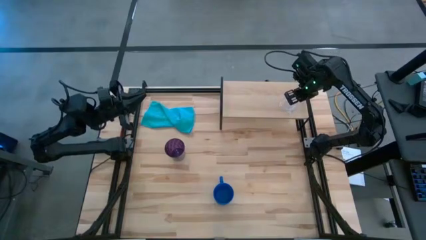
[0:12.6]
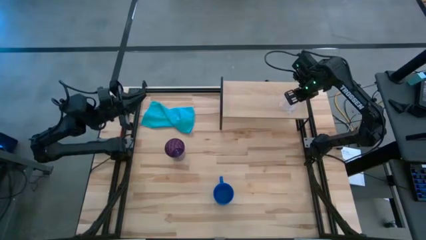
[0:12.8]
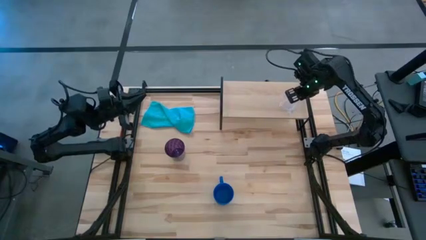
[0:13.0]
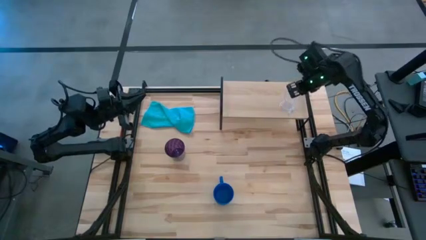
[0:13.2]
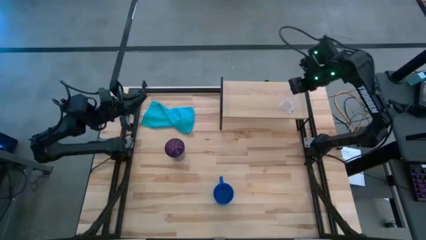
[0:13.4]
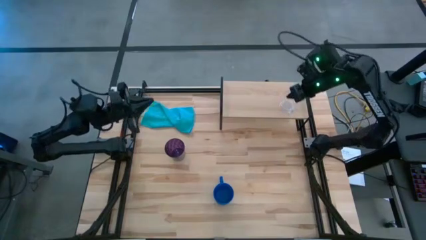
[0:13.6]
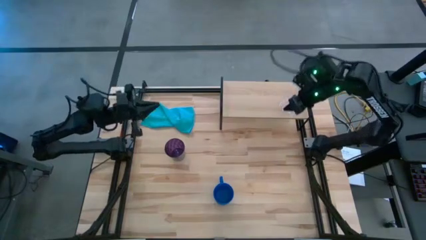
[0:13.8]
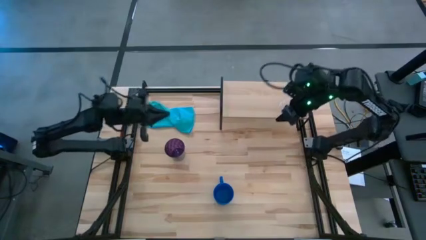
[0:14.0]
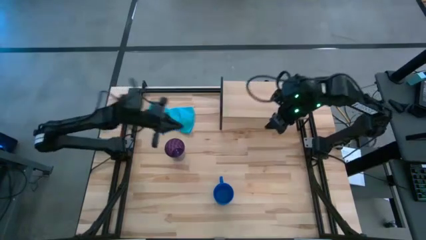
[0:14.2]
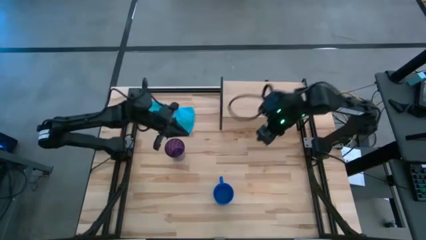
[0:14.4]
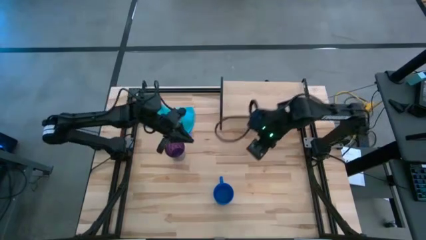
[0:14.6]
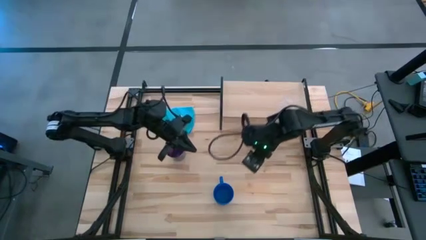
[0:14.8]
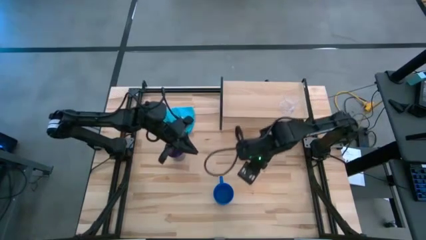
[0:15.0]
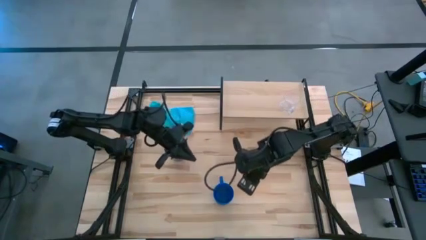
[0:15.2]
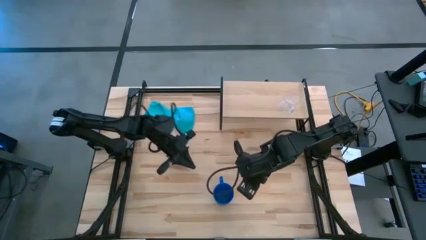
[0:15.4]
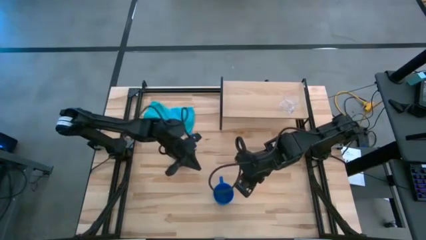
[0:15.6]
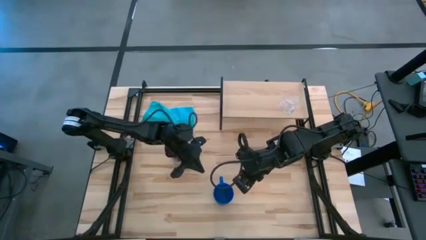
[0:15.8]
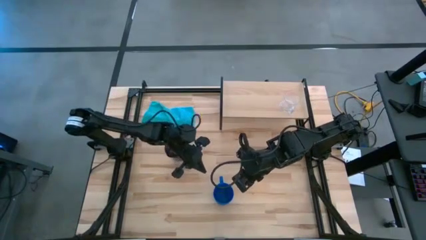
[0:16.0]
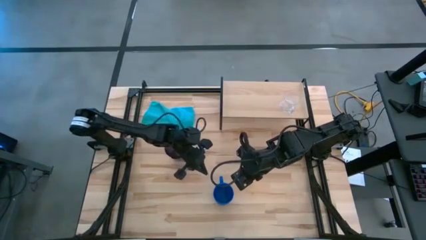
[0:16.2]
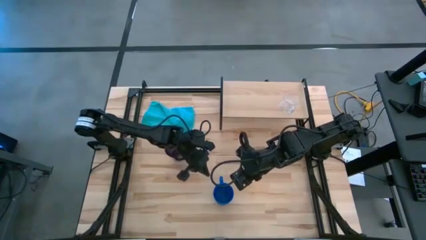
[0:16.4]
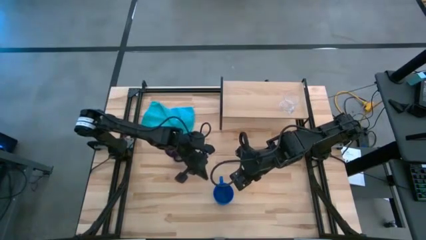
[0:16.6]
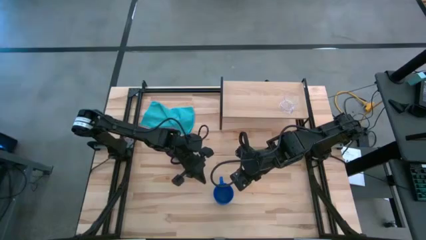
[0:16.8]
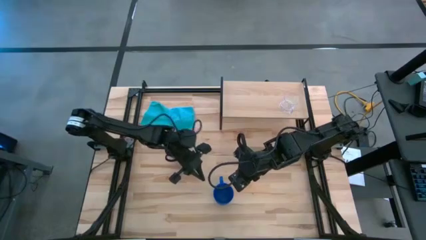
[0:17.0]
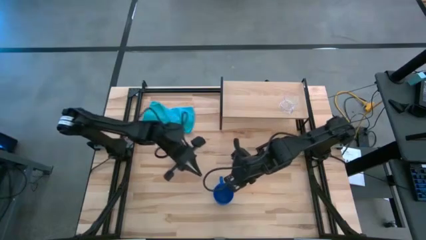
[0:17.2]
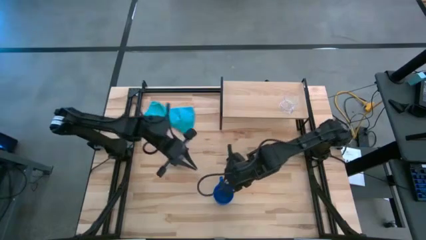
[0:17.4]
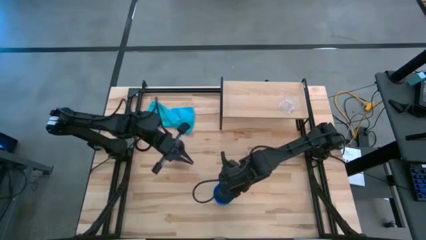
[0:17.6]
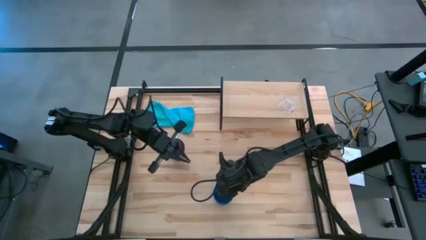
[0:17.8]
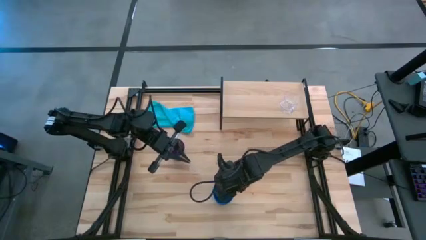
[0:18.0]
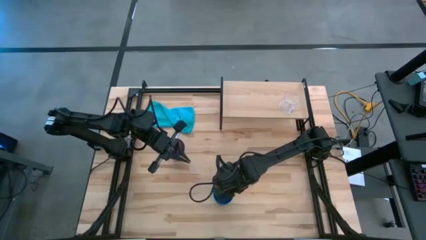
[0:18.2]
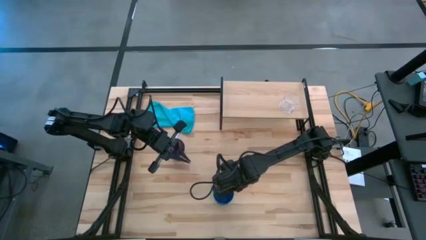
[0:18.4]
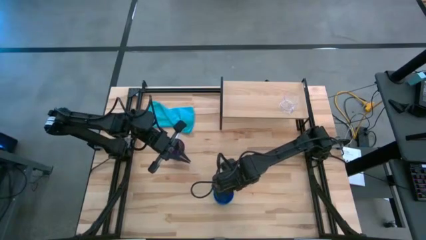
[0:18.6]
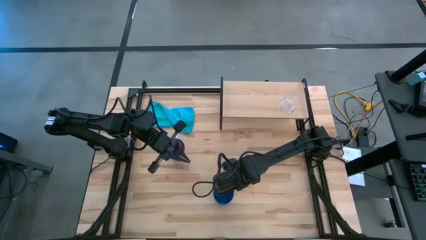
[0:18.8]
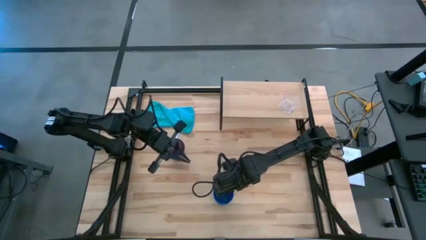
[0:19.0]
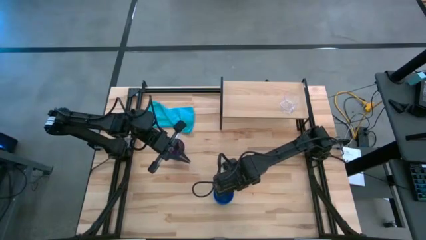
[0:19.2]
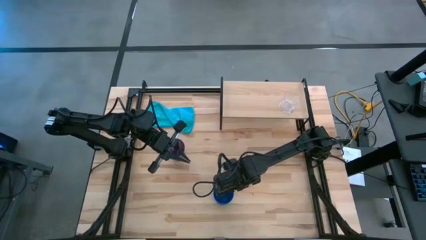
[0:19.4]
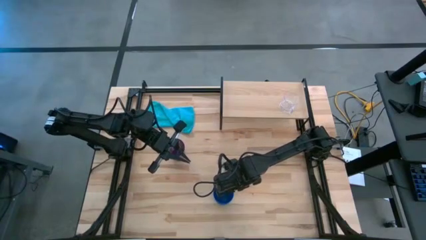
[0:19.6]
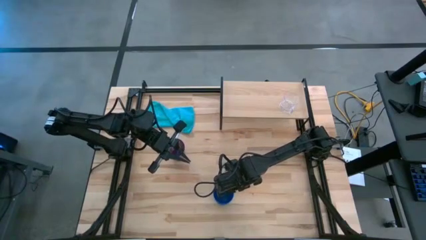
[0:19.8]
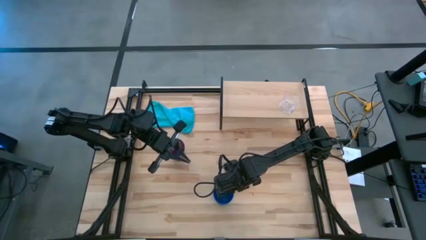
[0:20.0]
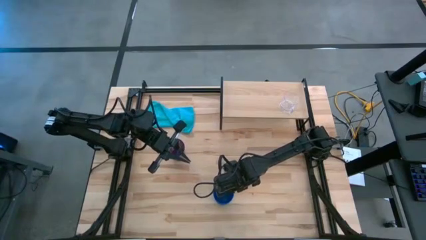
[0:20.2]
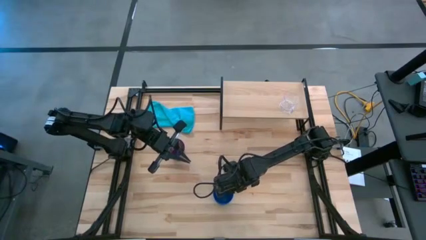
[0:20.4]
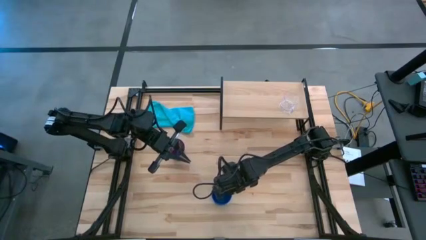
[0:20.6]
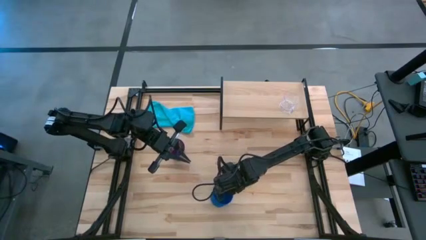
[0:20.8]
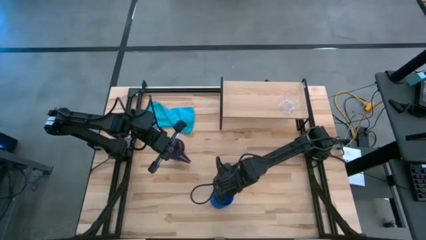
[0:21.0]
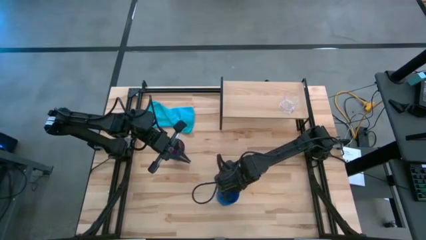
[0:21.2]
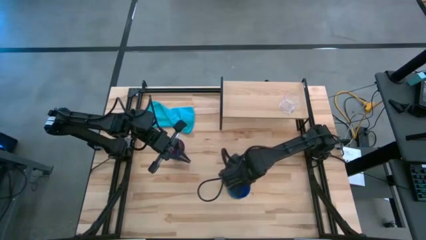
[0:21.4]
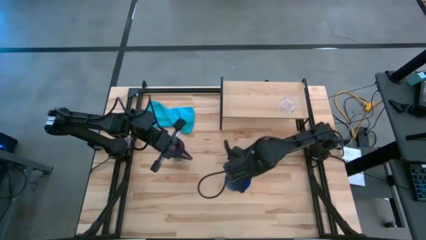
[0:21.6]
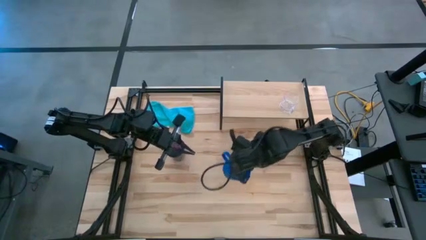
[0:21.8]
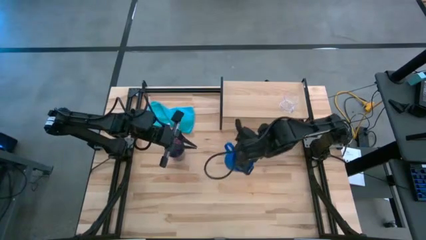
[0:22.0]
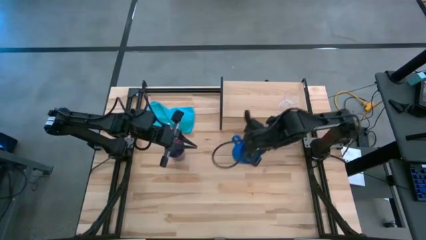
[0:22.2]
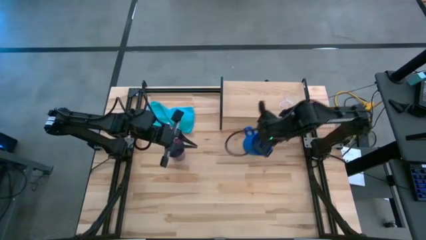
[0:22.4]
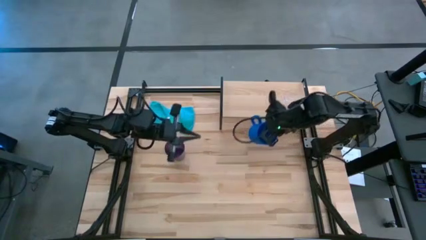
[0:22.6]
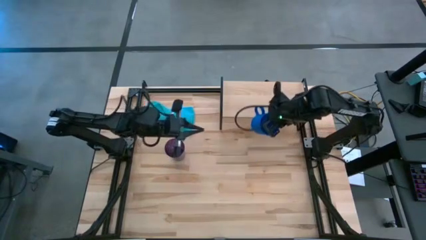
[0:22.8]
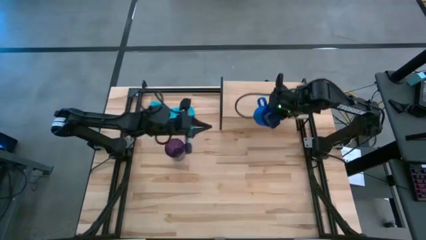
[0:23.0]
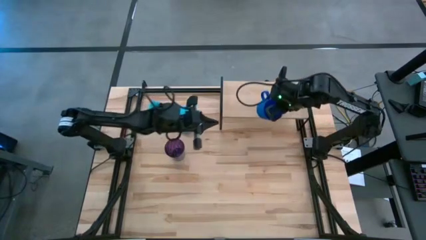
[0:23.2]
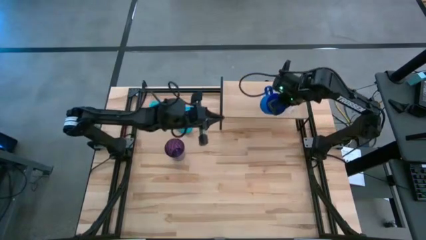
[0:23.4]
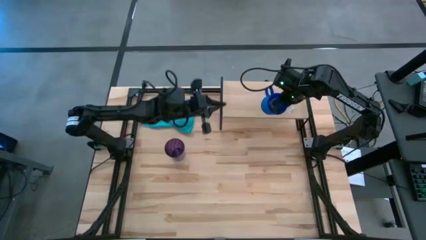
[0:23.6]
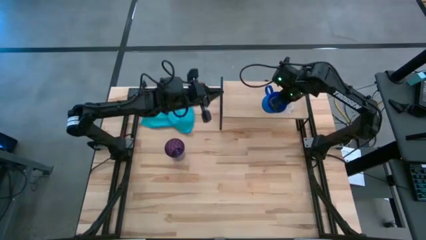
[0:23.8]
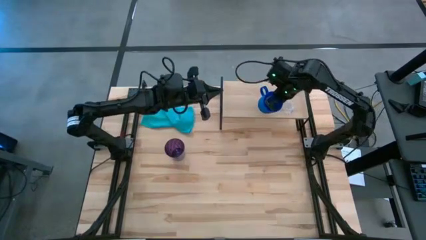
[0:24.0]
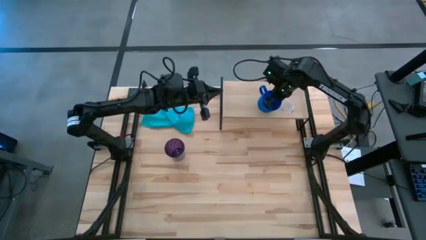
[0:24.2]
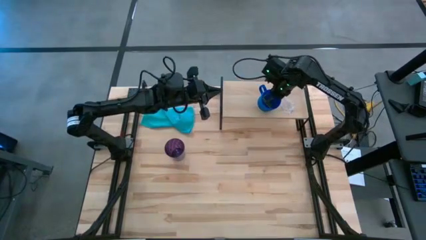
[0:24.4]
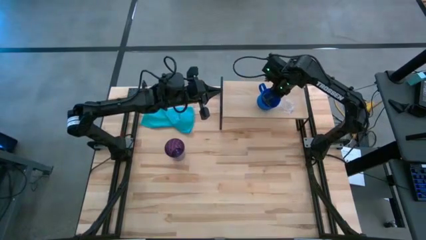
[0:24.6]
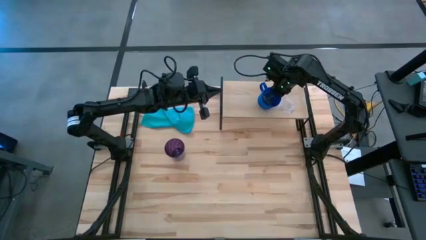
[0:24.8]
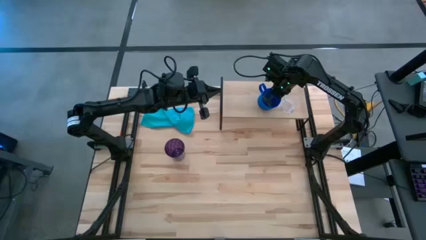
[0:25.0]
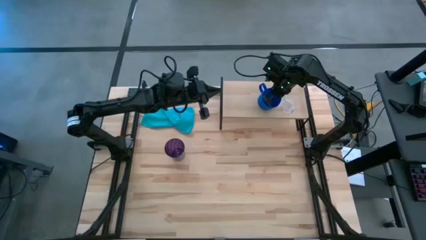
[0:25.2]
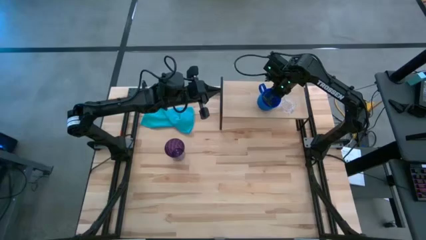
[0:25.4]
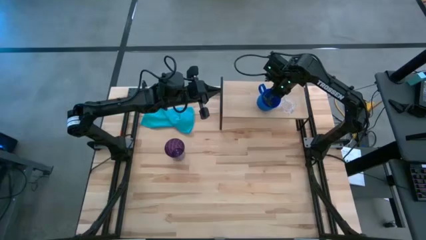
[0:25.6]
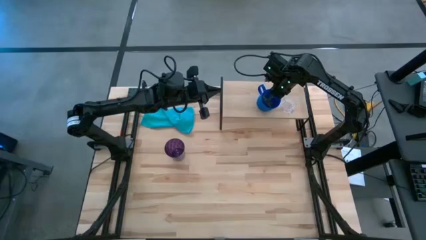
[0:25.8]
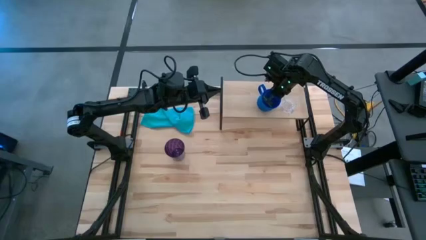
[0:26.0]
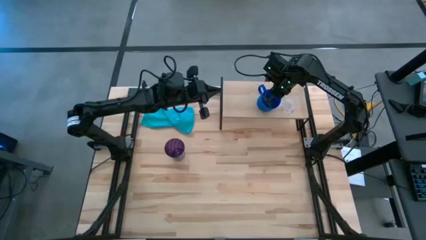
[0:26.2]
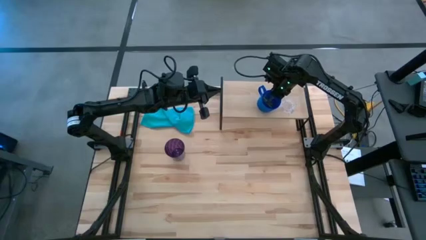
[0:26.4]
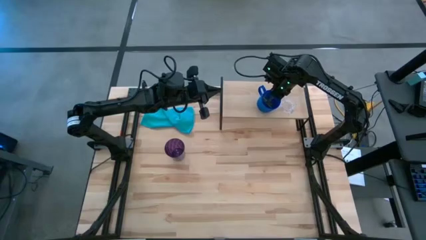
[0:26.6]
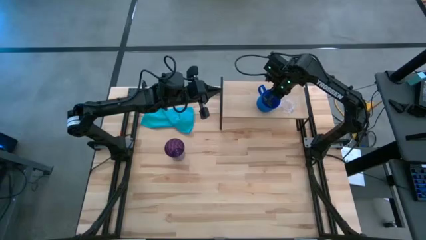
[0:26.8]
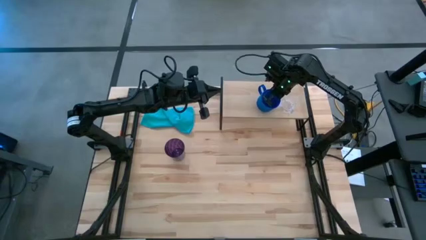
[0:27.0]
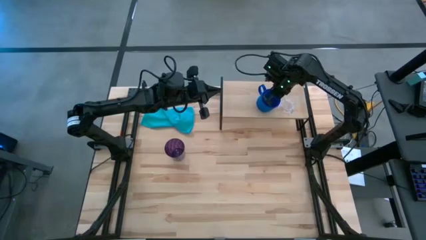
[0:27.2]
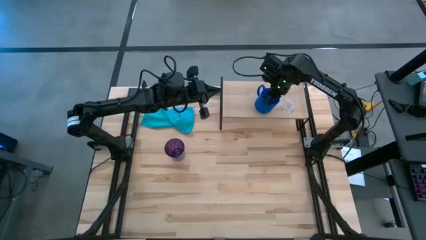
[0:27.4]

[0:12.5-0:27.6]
Task: Stack small to large cups/mugs on shelf
Put the blue cup on the shelf
